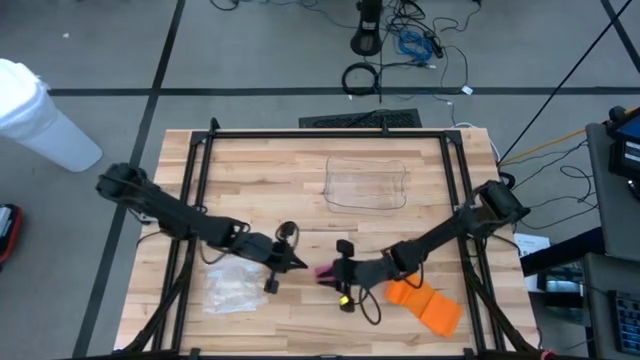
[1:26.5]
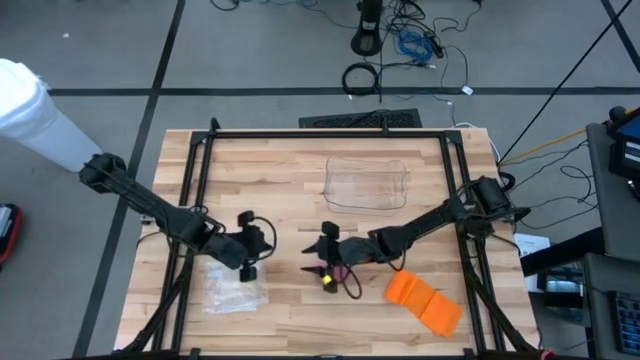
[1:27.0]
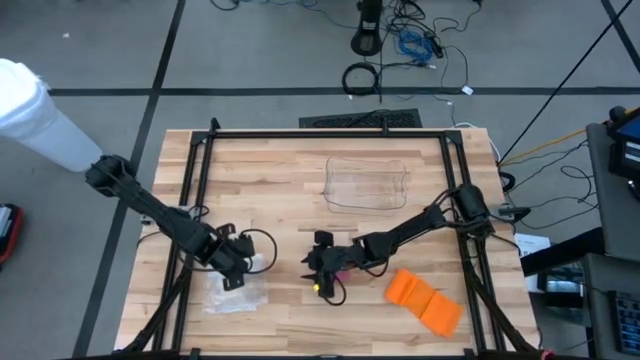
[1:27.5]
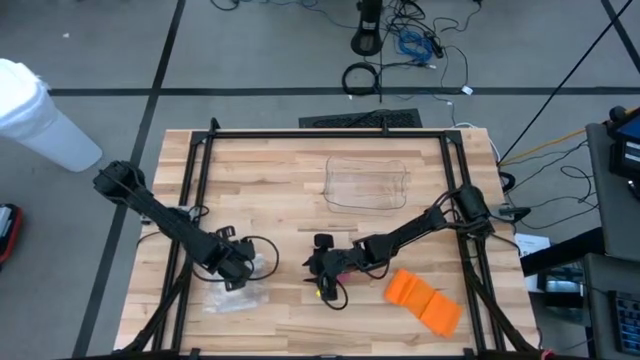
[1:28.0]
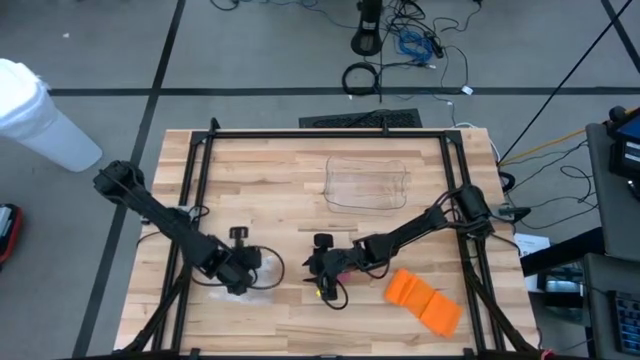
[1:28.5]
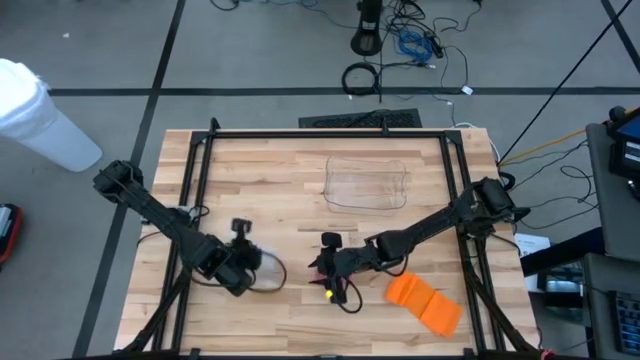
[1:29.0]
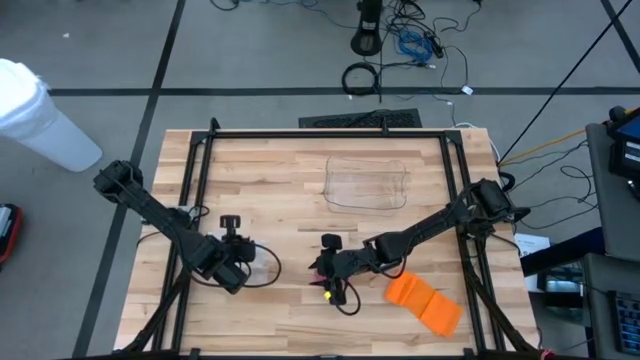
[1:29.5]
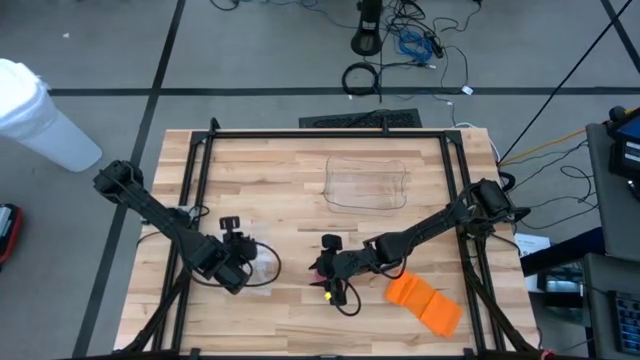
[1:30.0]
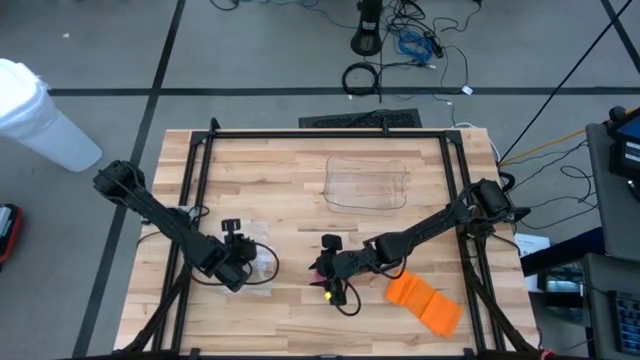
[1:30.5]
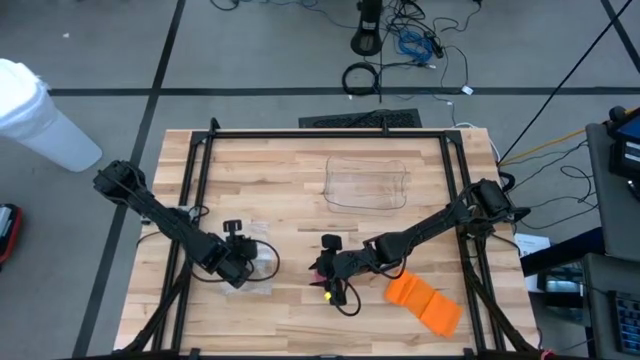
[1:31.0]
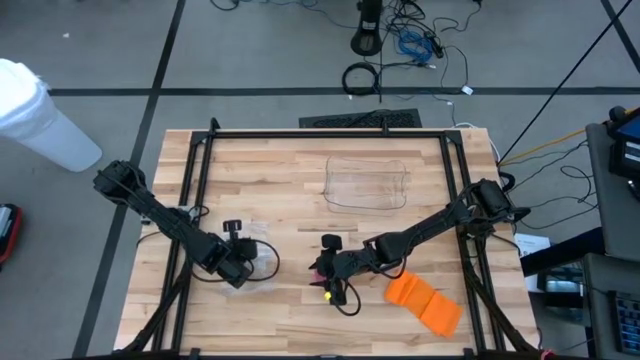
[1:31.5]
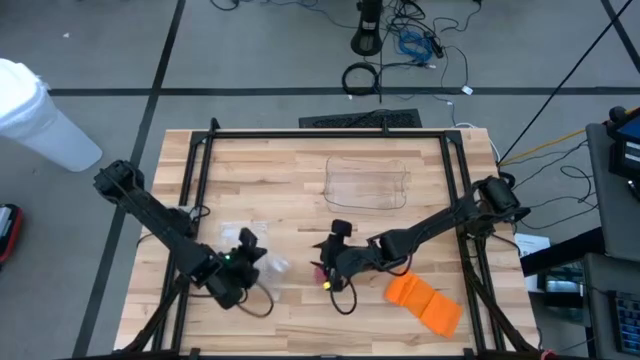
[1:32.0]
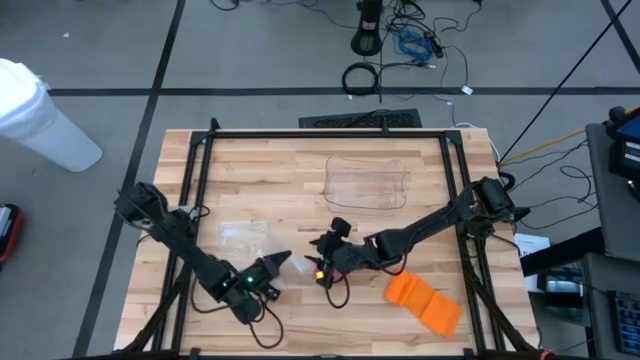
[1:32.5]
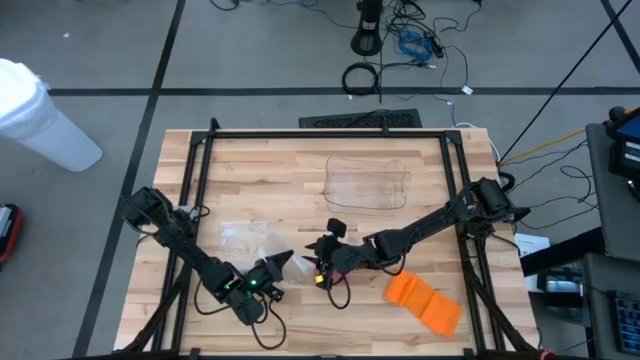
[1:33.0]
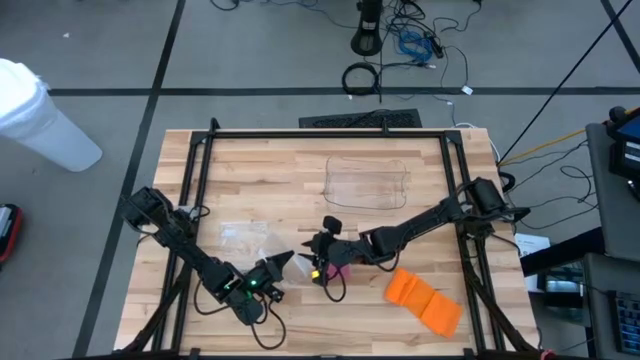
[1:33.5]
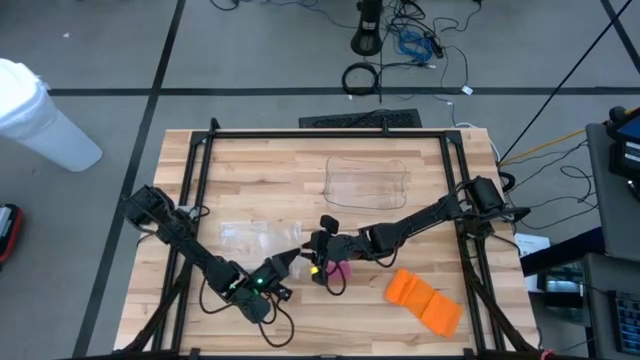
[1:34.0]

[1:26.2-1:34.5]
Task: Roll bandage
Open the top transparent zip bag

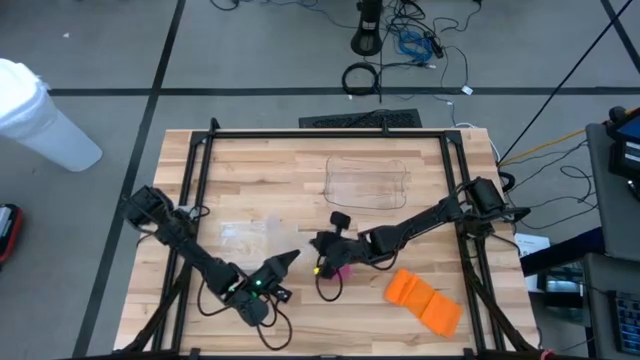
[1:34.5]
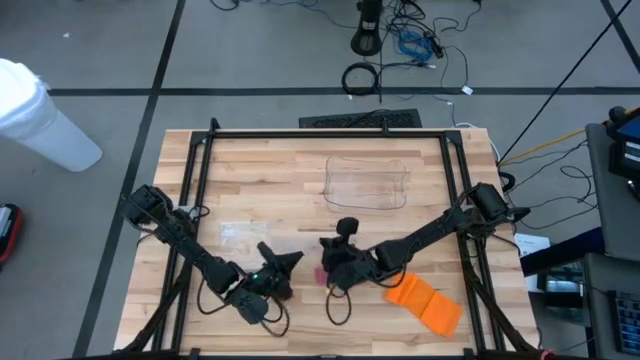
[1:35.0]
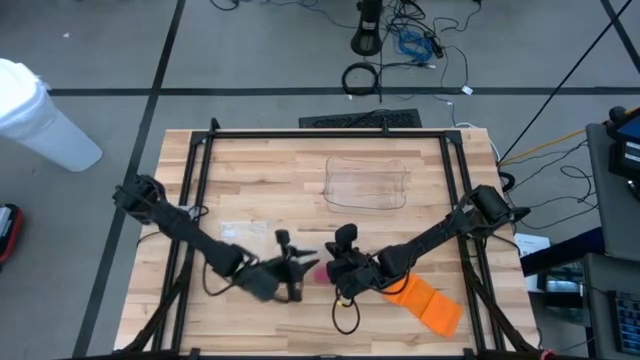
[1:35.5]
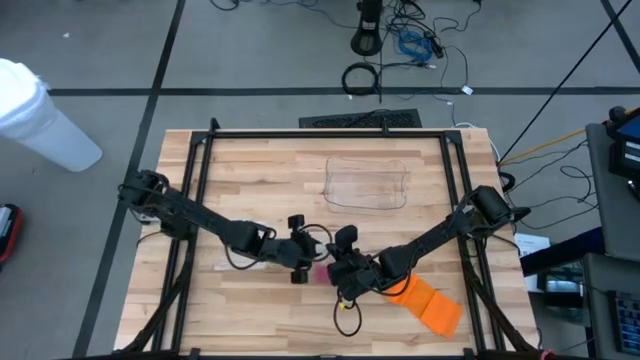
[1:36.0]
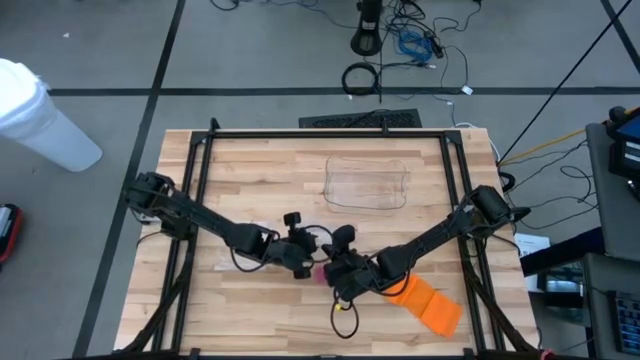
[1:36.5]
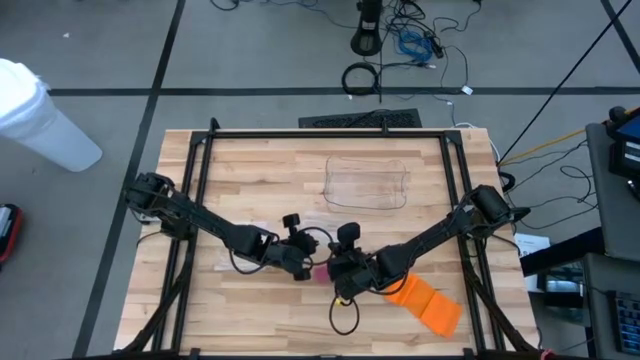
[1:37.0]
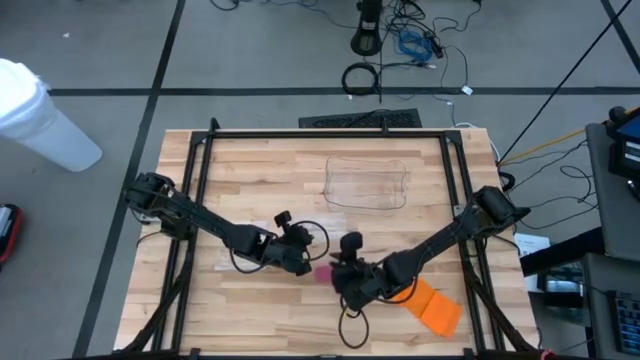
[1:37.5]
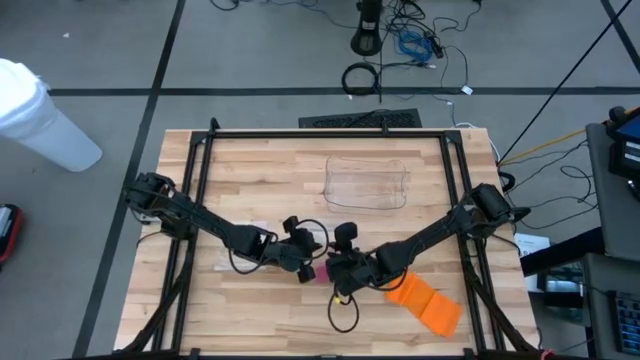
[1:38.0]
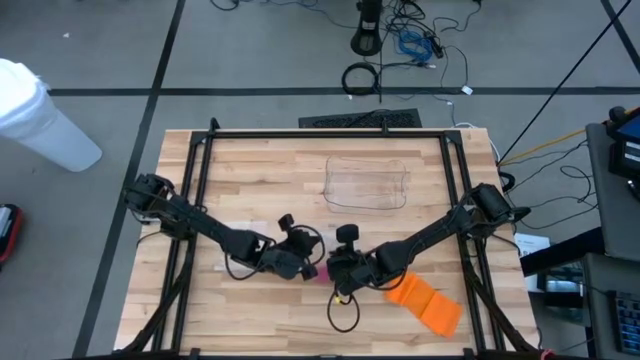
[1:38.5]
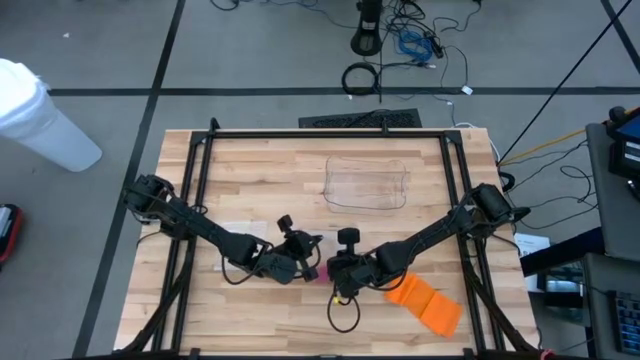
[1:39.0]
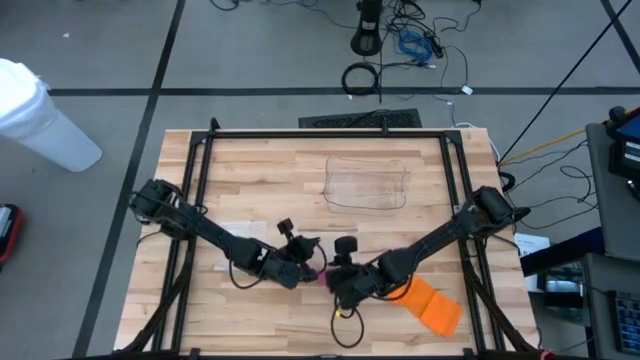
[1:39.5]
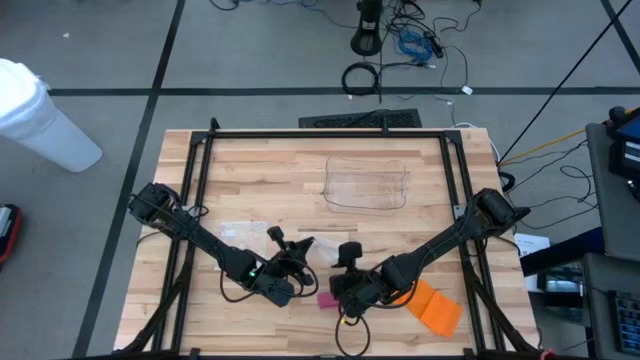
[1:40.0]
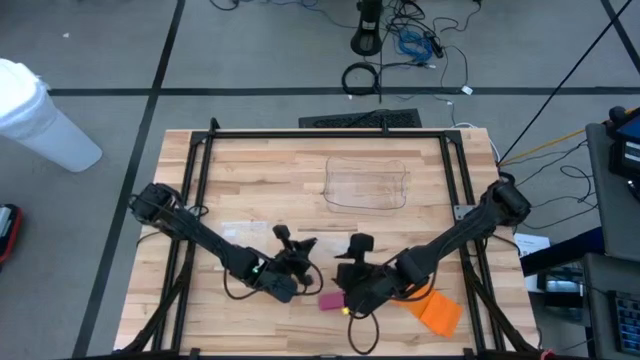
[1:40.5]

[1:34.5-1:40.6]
Open the top transparent zip bag

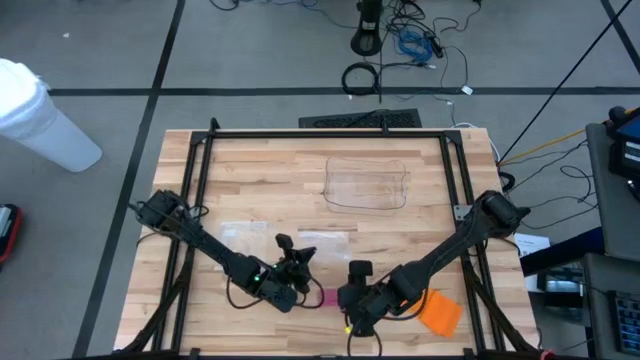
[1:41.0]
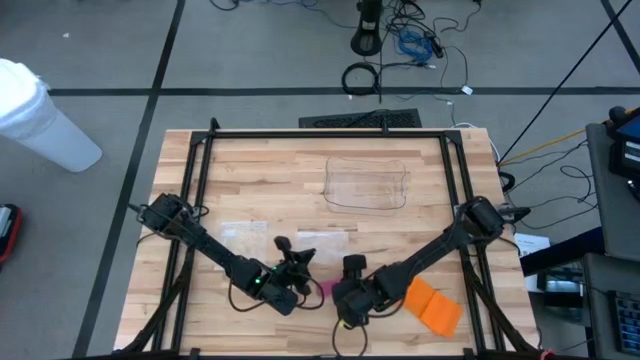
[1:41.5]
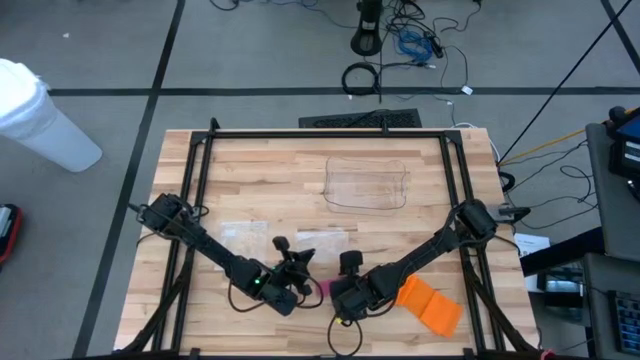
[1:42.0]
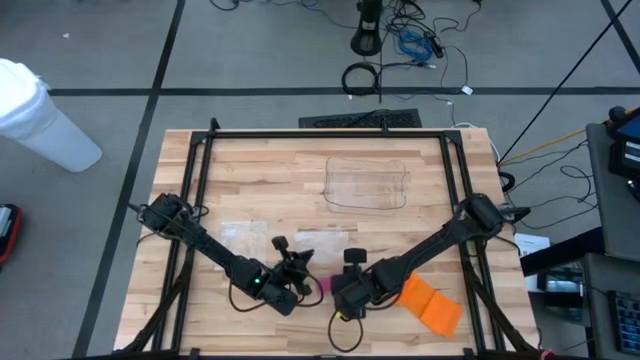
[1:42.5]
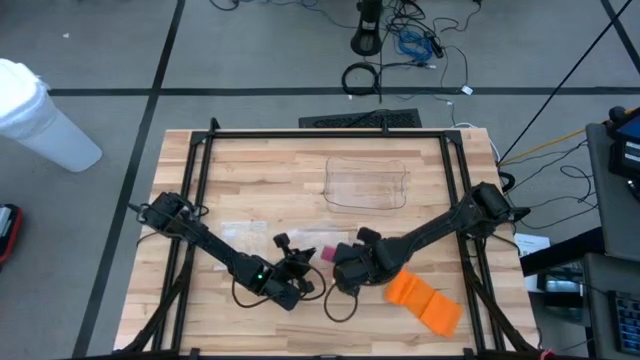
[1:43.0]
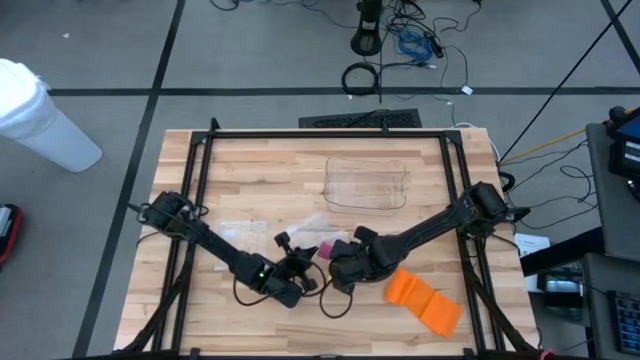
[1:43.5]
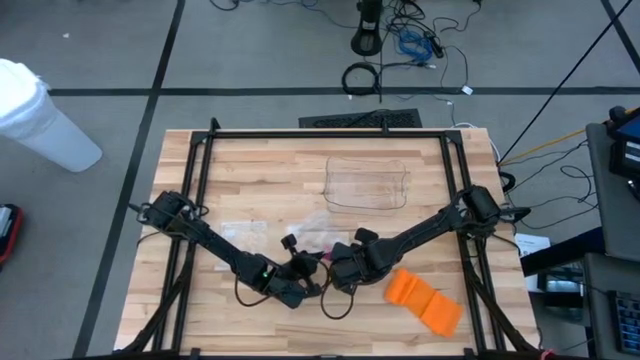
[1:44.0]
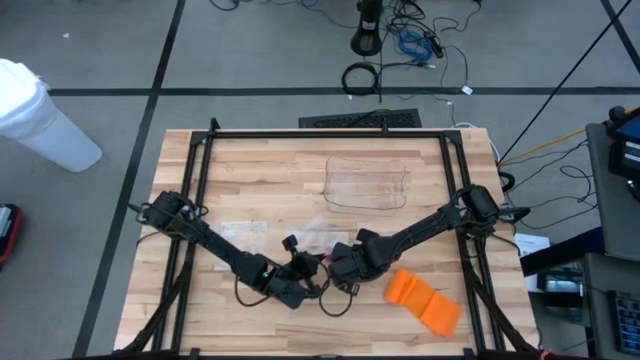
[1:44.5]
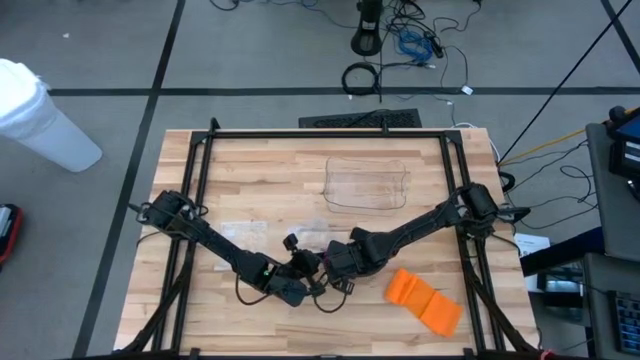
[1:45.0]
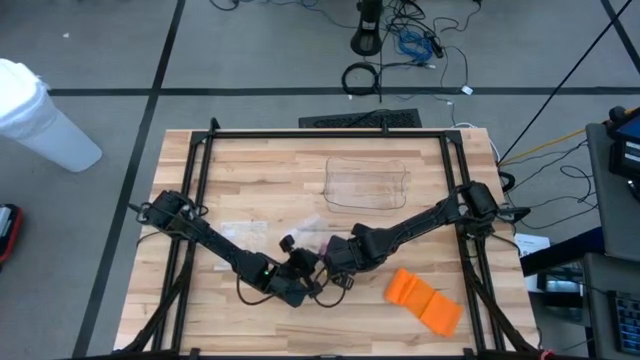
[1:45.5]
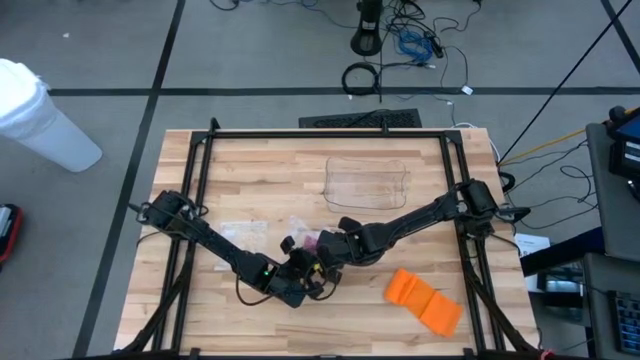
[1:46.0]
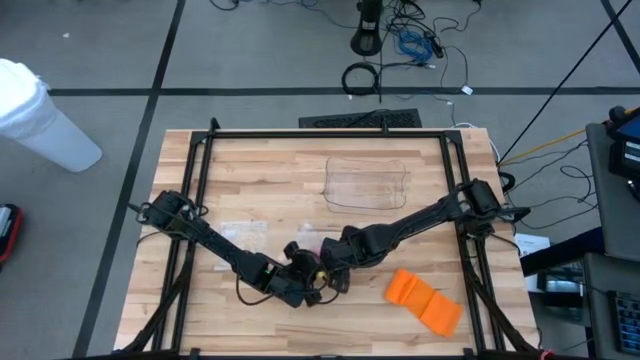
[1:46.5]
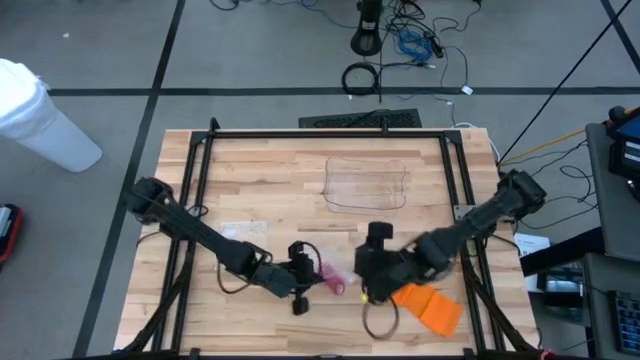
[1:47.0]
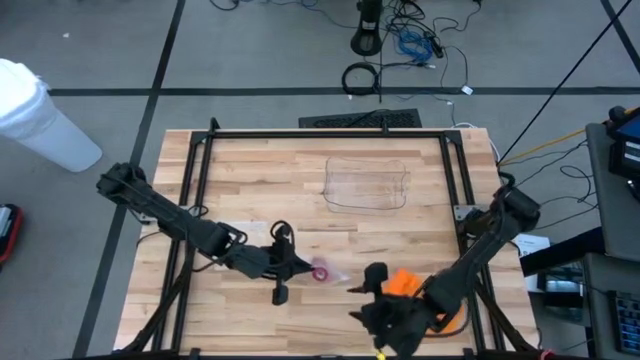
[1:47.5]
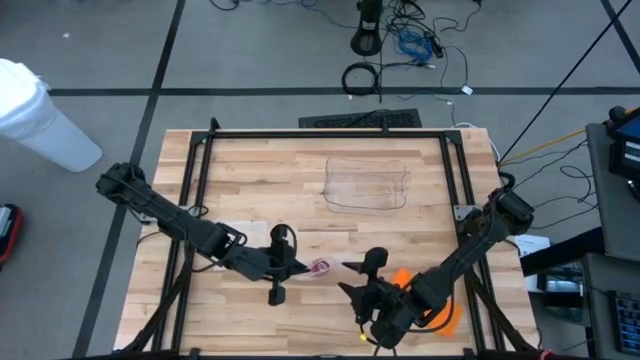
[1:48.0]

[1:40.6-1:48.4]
Put the rolled pink bandage into the top transparent zip bag

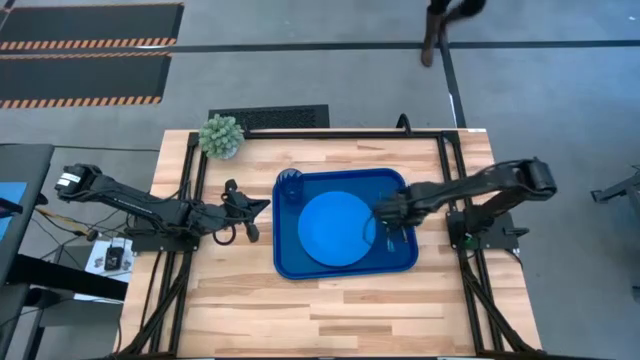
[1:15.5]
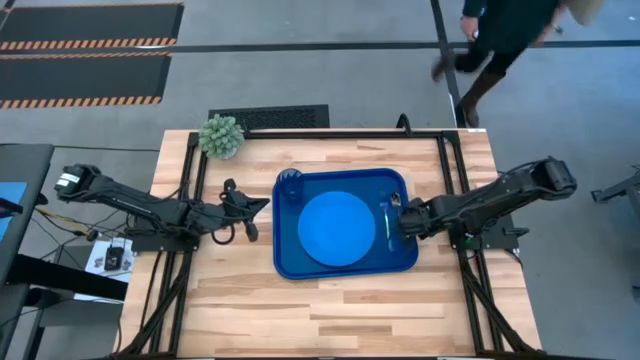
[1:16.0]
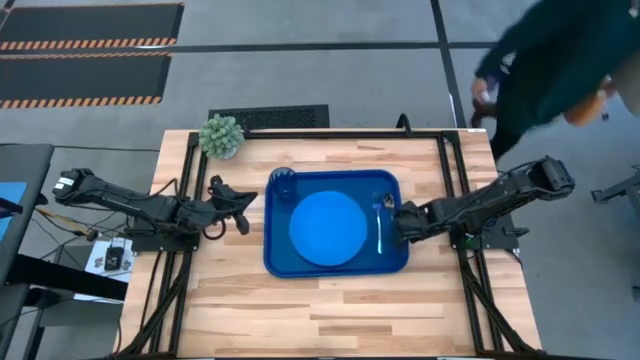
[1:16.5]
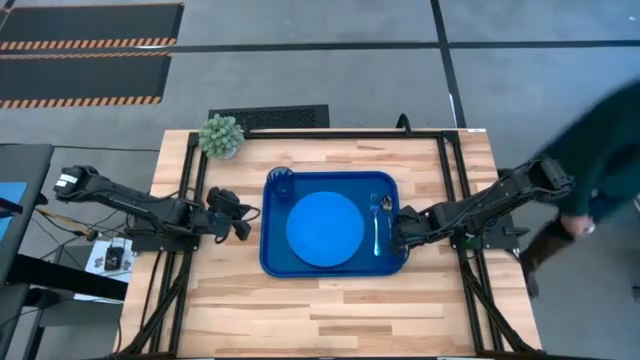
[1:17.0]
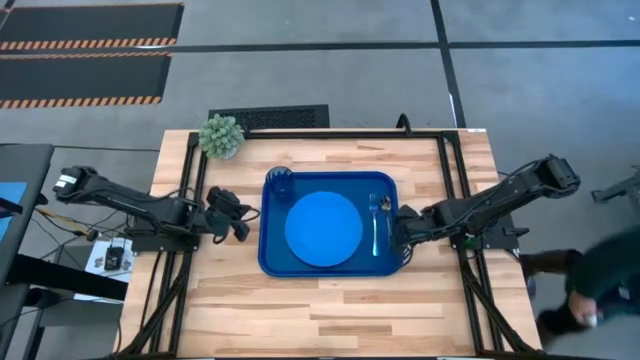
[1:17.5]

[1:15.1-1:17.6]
Task: Pick and place plate/cup/fork/spoon on tray
Adjust the blue tray
